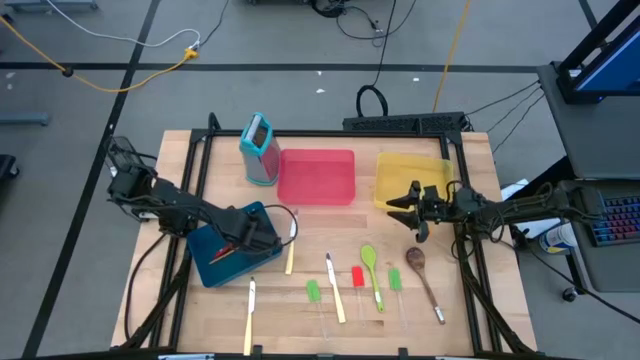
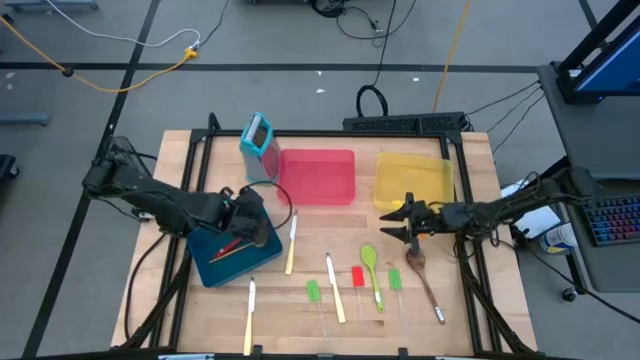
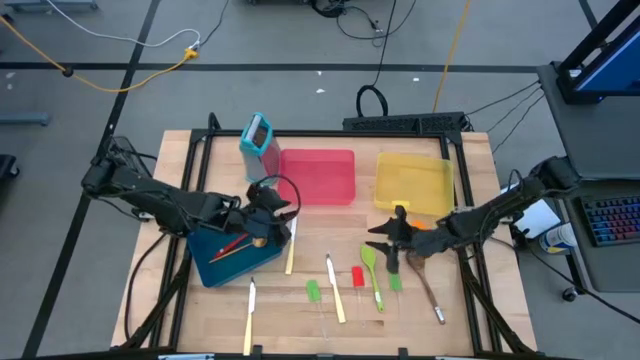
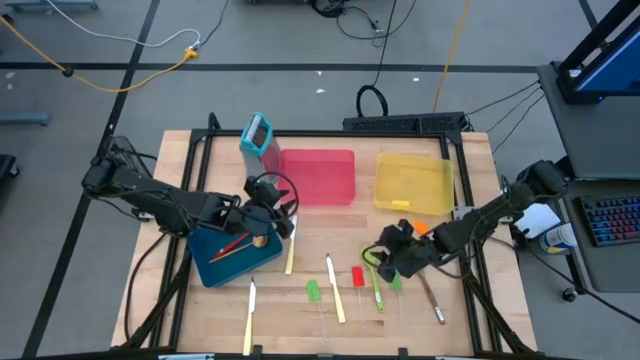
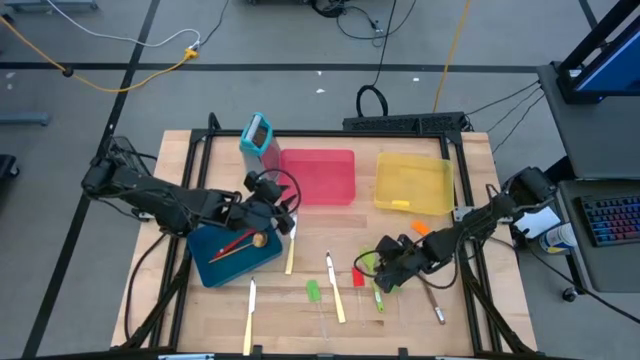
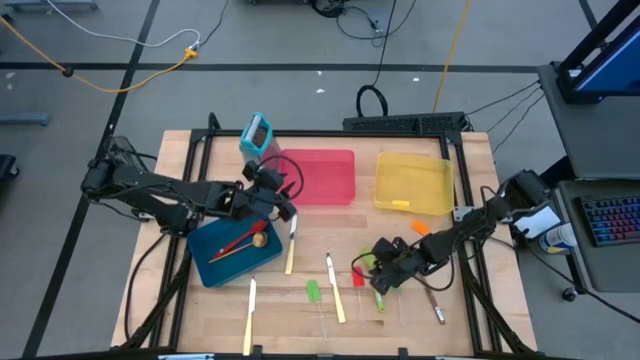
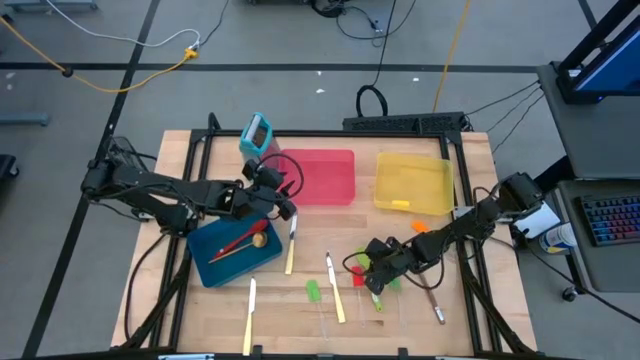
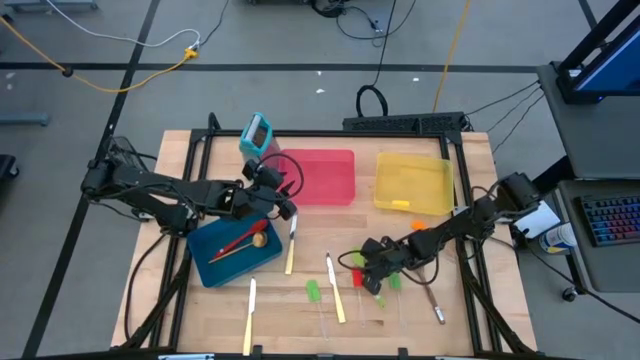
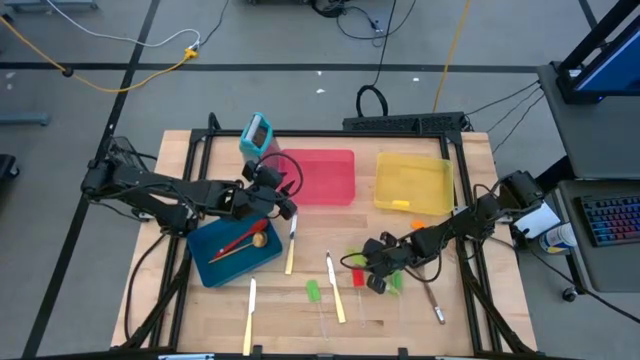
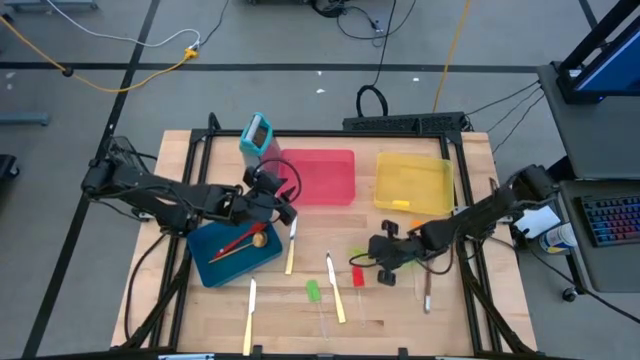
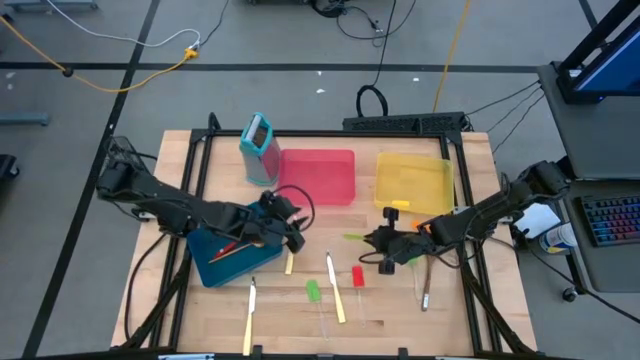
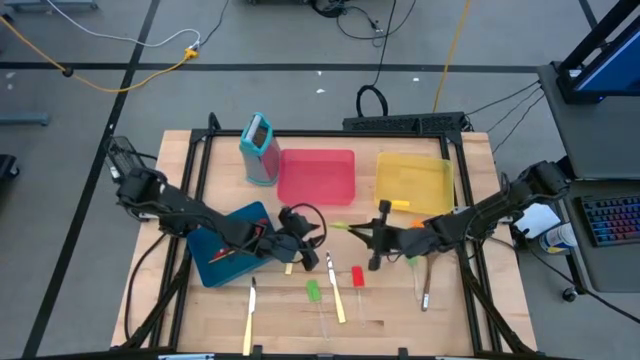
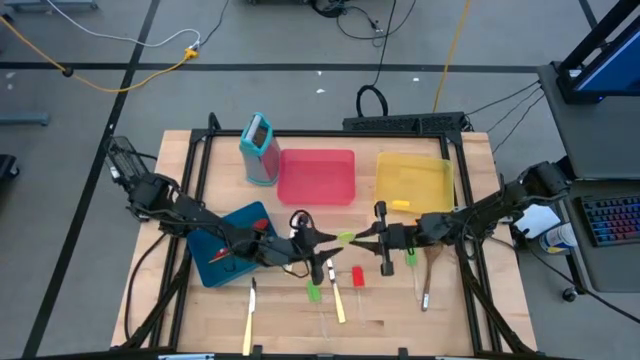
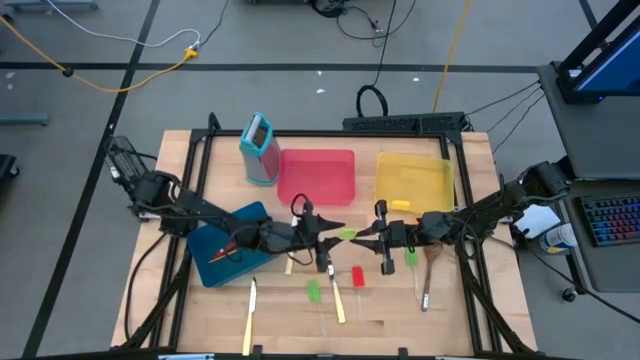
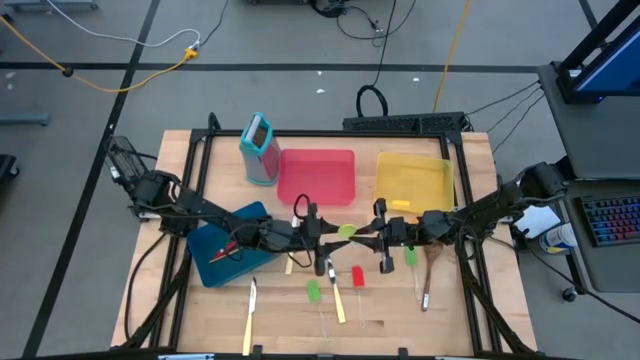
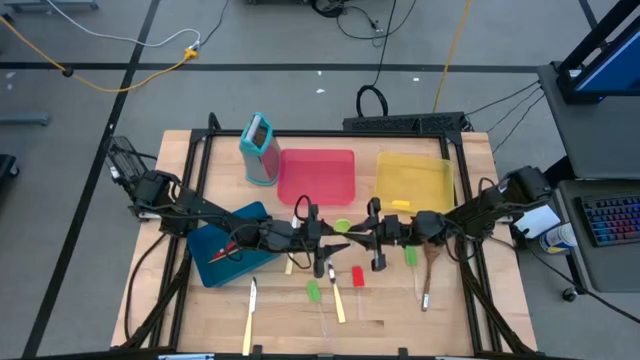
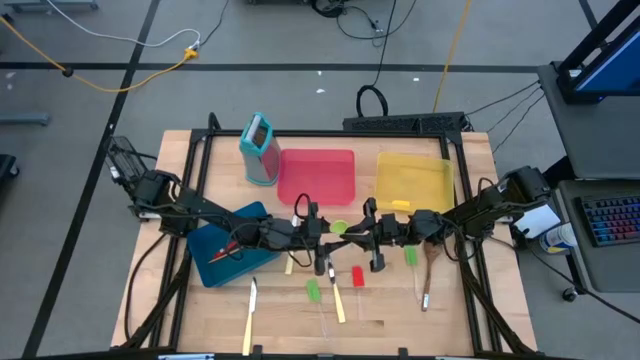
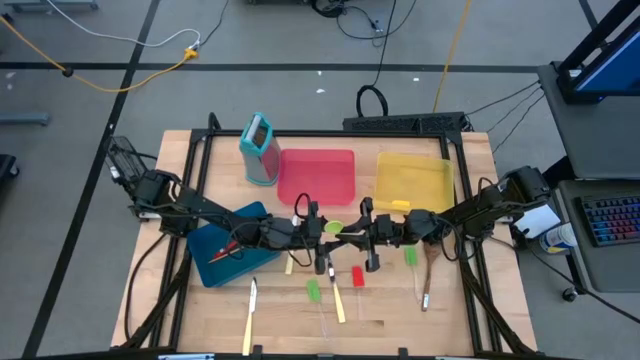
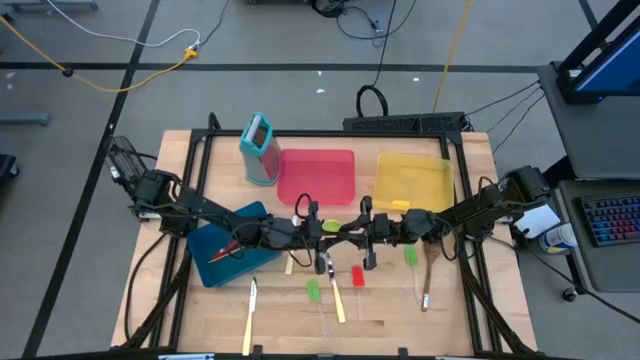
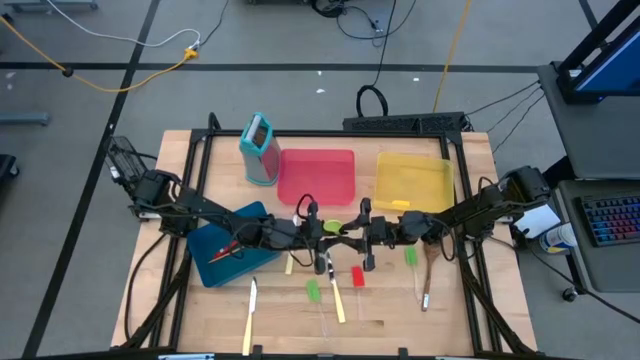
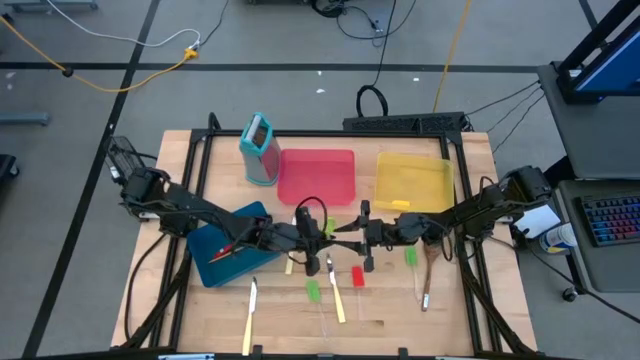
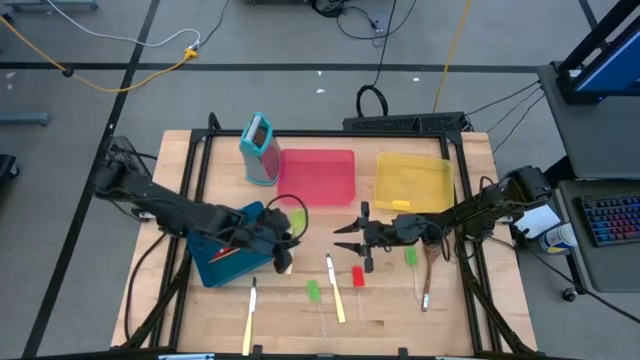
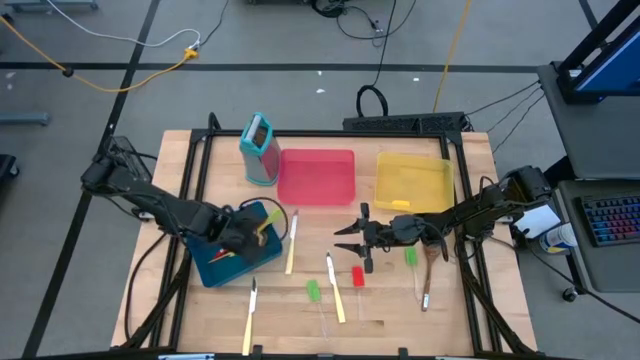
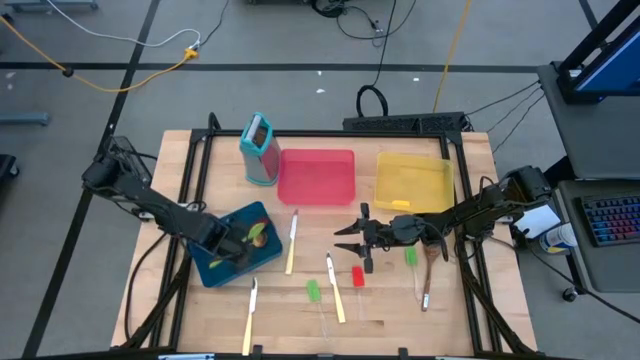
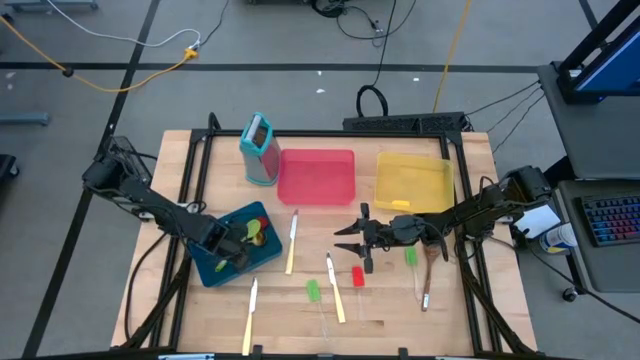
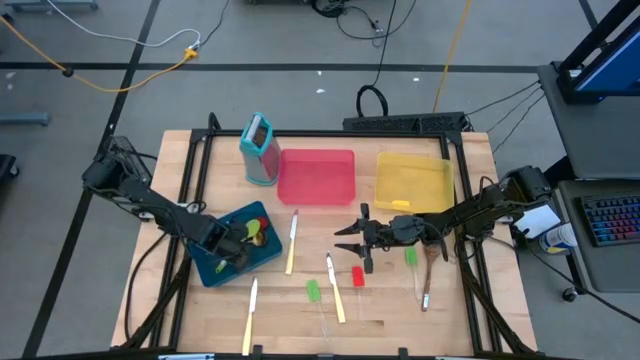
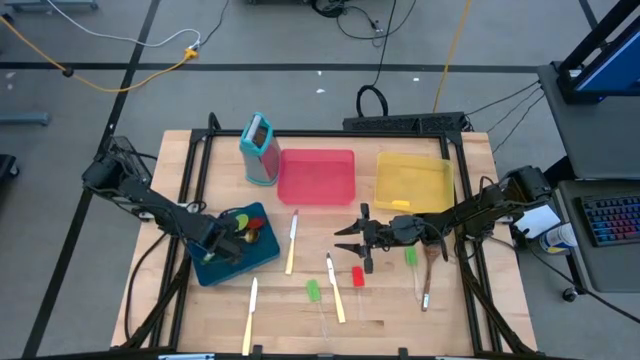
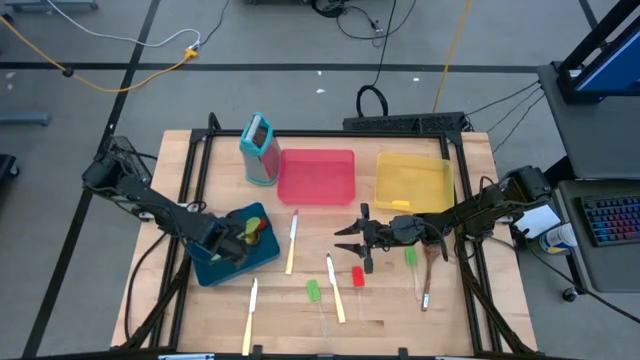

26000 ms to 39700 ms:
Task: Pick & Place Kitchen Items
Put the green serving spoon into the blue bin

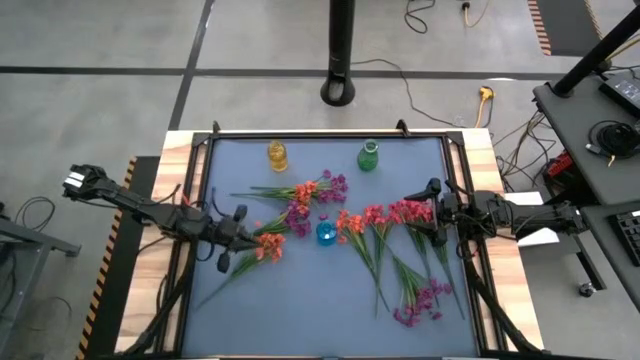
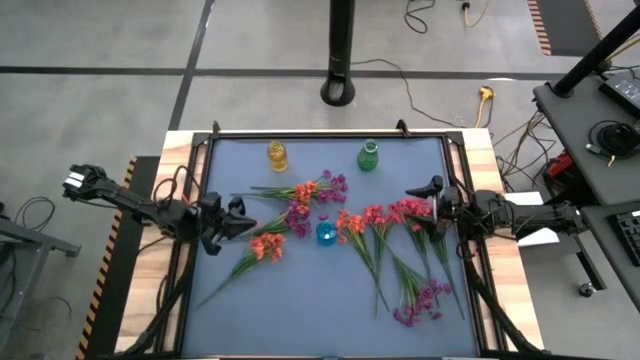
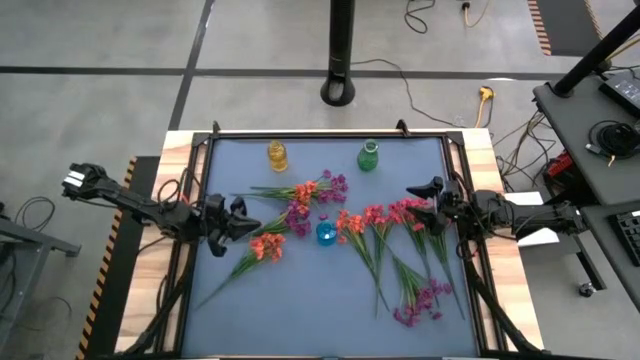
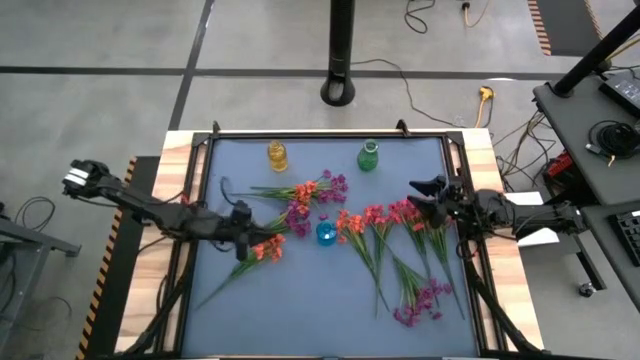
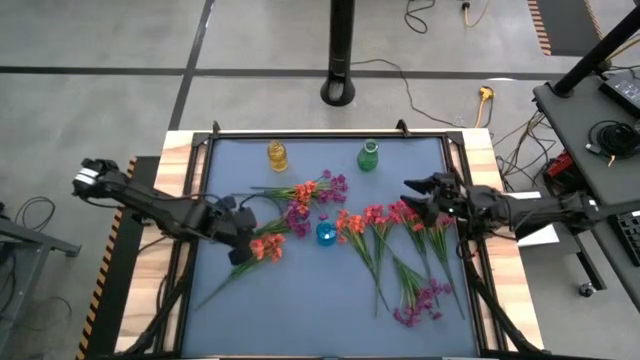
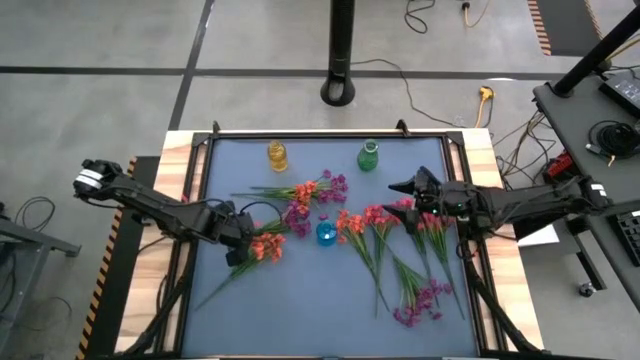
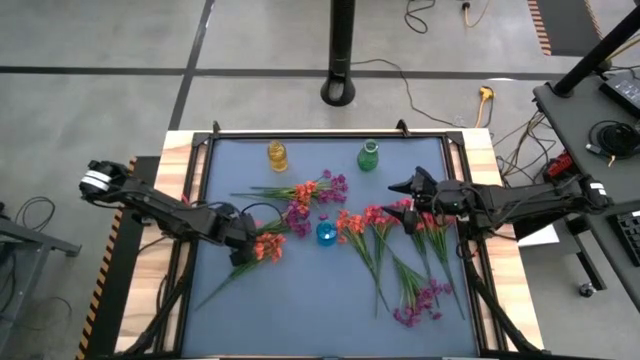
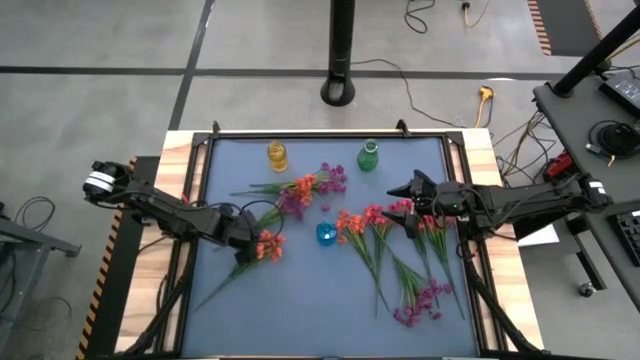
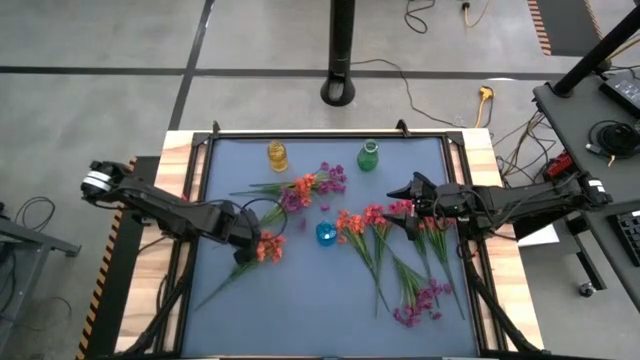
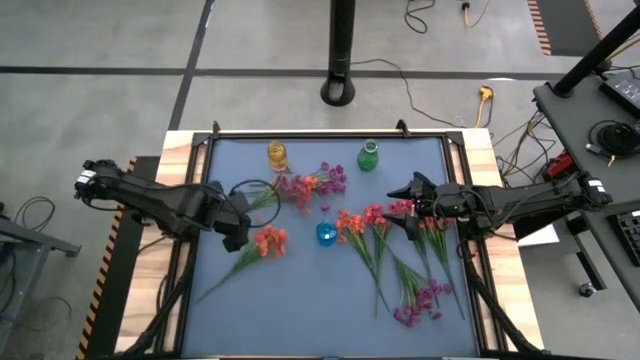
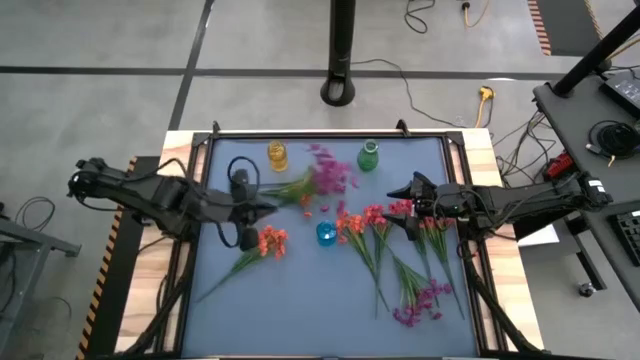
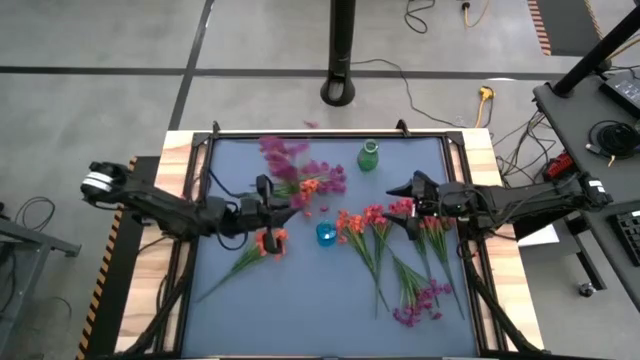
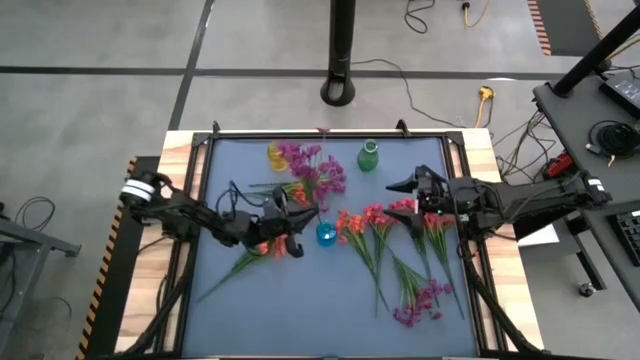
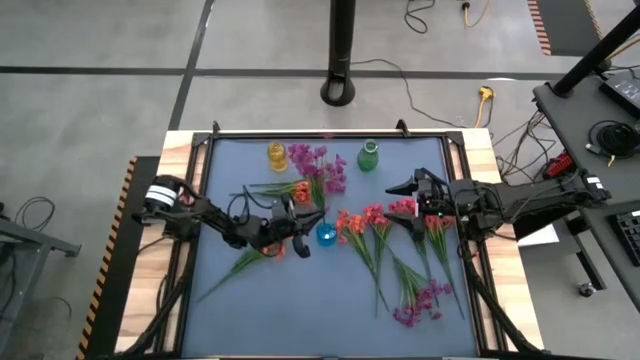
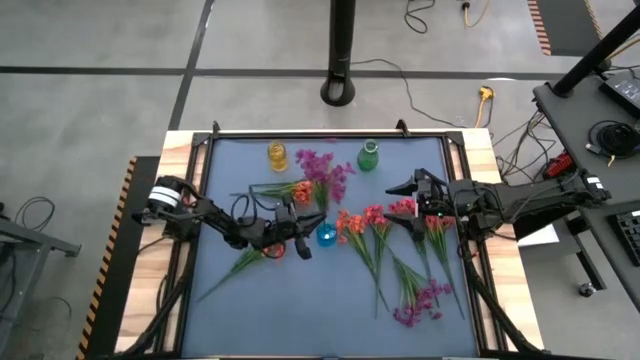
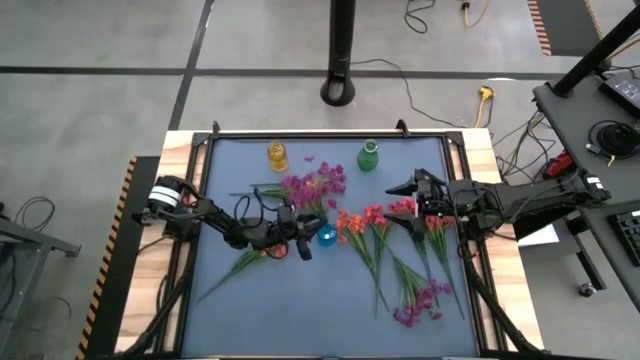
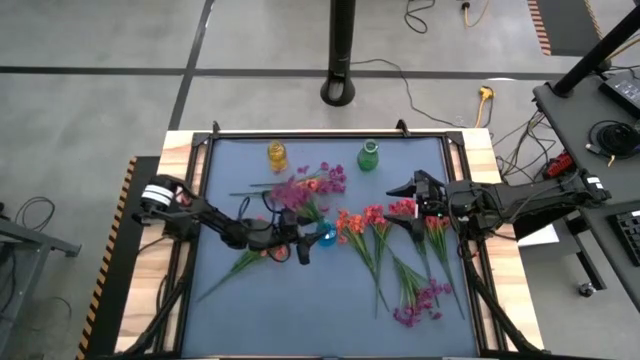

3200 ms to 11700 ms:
Task: Sort flowers into vase by color
Put the center violet flower into the blue vase
